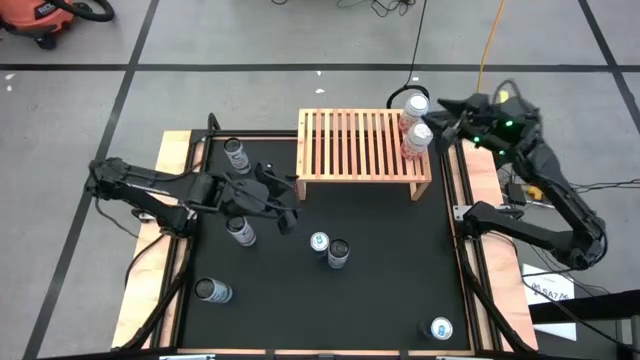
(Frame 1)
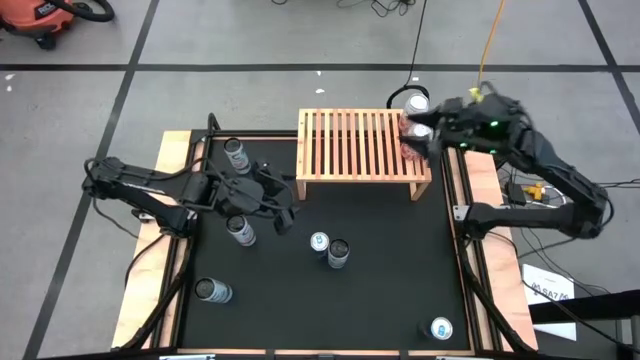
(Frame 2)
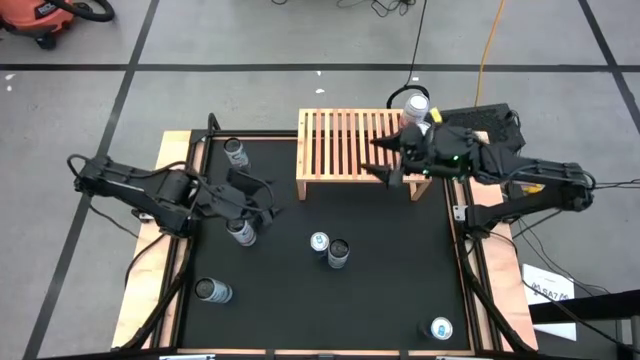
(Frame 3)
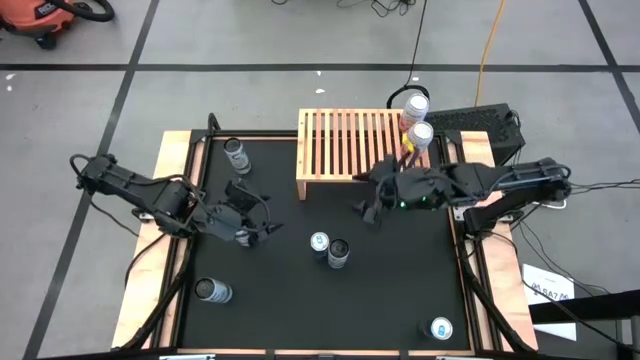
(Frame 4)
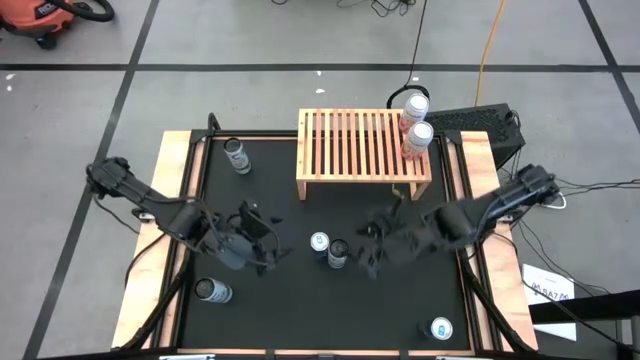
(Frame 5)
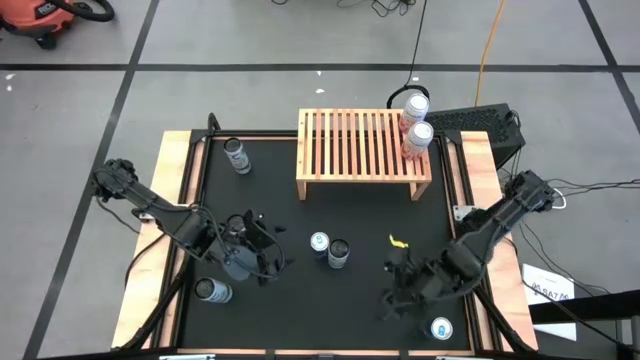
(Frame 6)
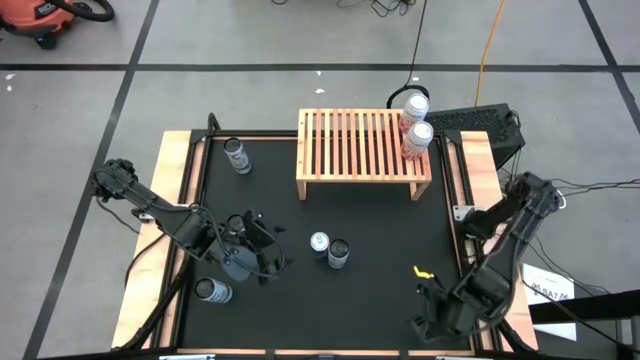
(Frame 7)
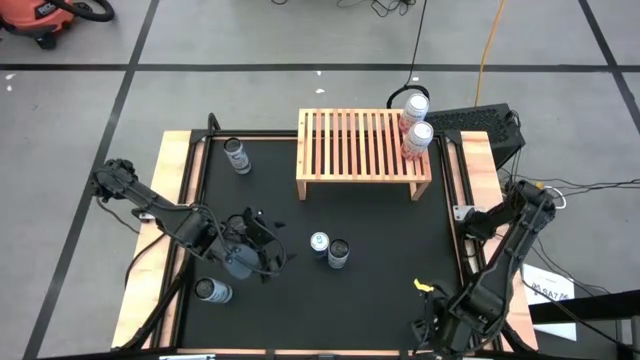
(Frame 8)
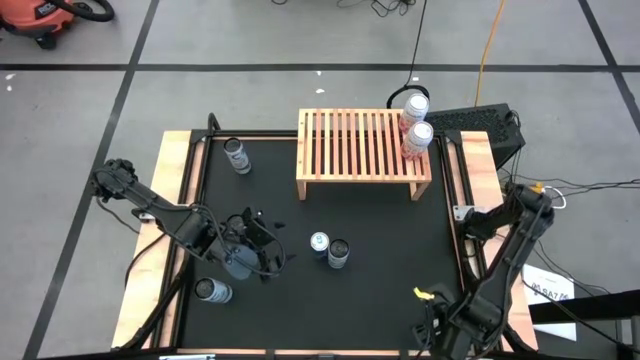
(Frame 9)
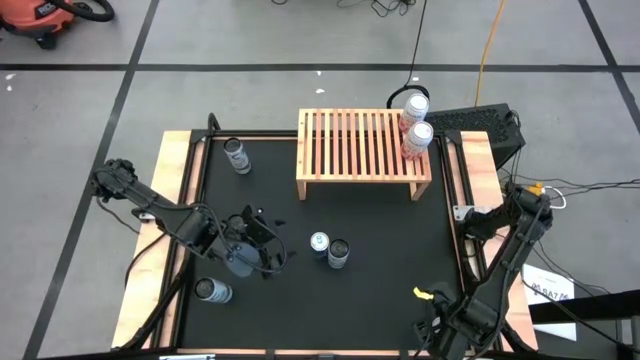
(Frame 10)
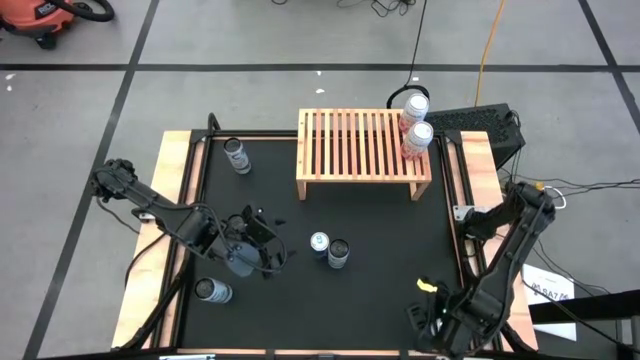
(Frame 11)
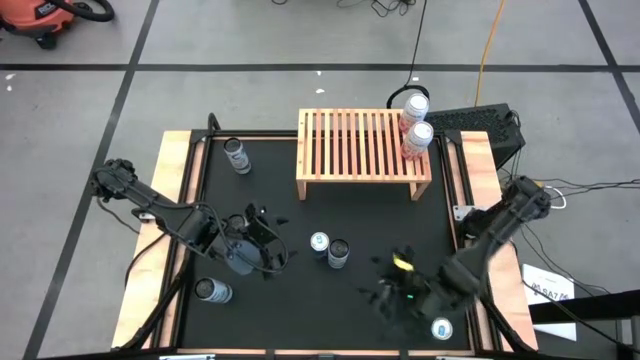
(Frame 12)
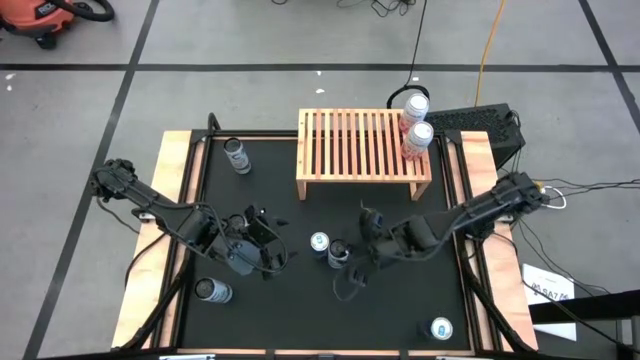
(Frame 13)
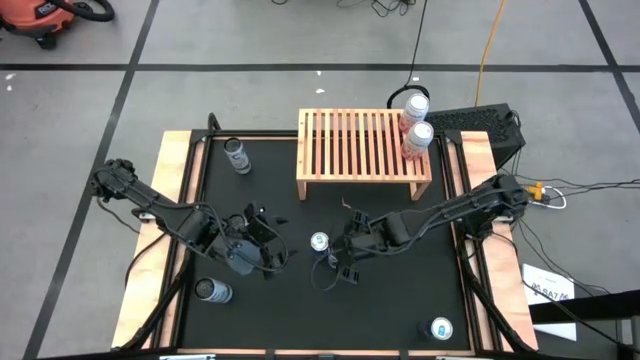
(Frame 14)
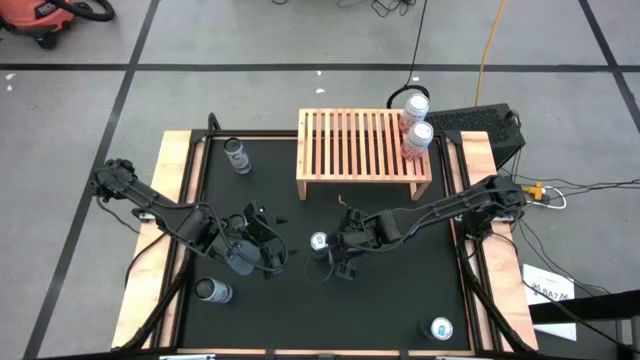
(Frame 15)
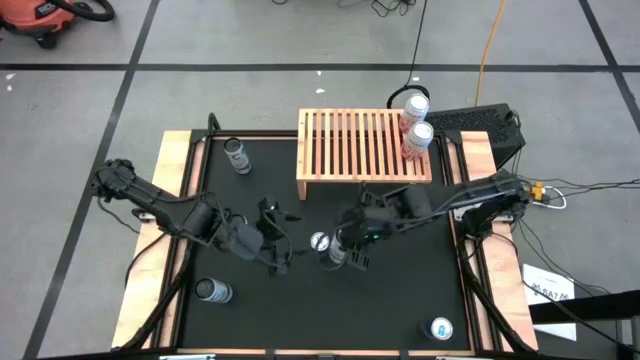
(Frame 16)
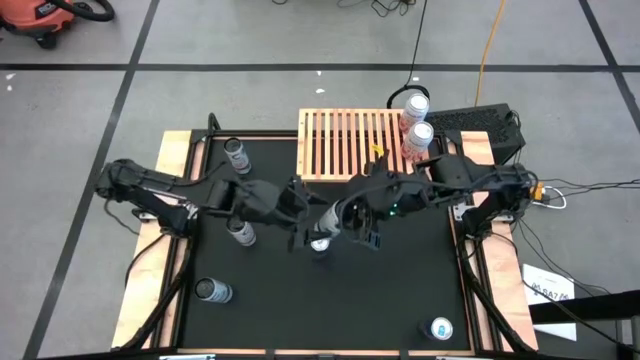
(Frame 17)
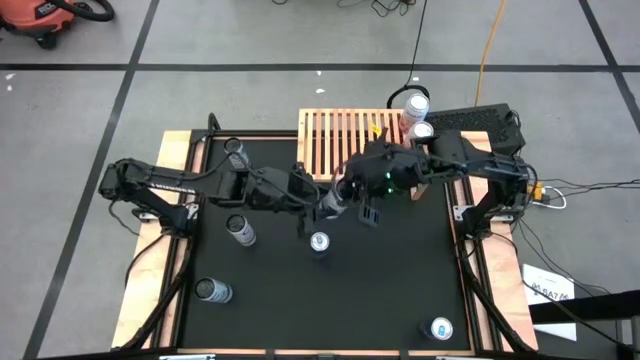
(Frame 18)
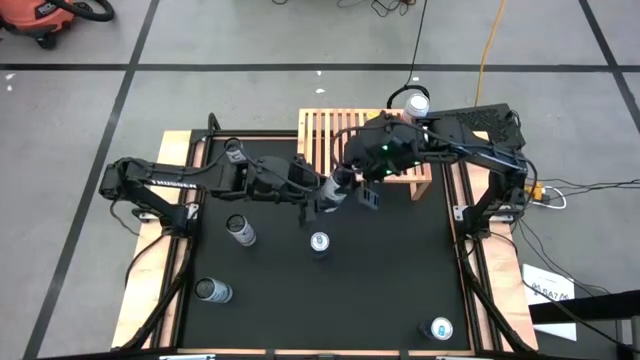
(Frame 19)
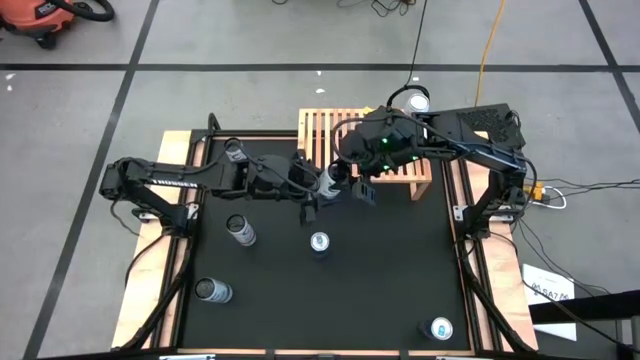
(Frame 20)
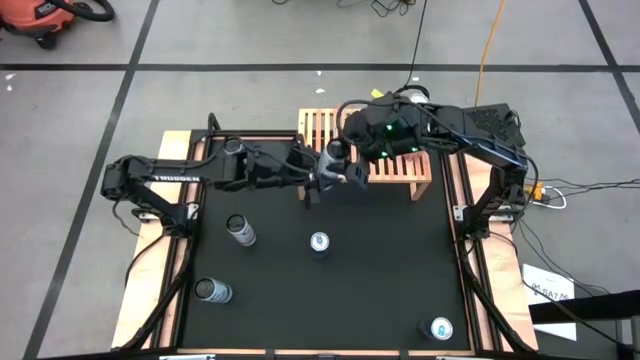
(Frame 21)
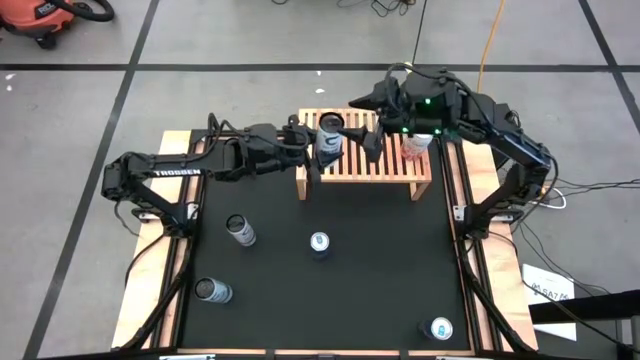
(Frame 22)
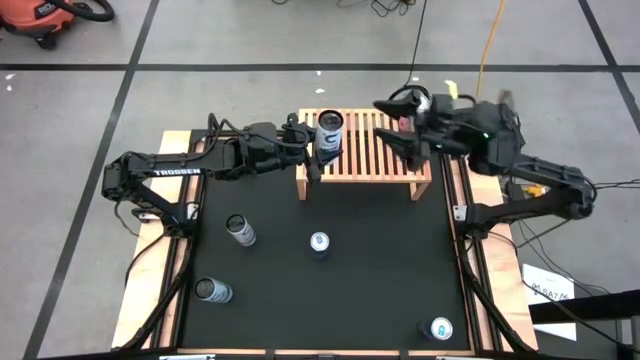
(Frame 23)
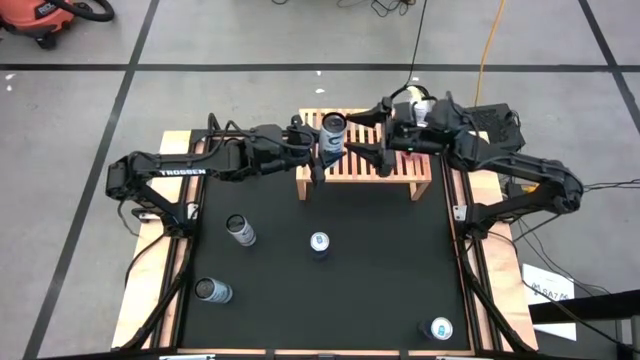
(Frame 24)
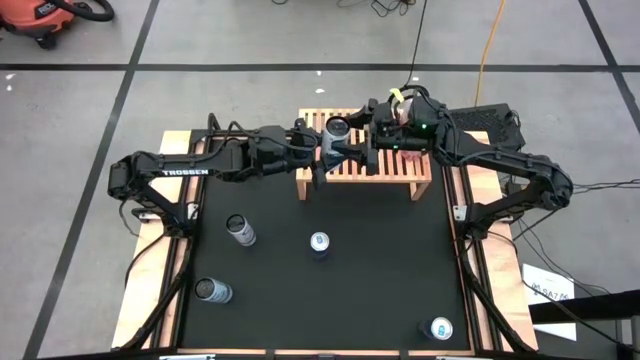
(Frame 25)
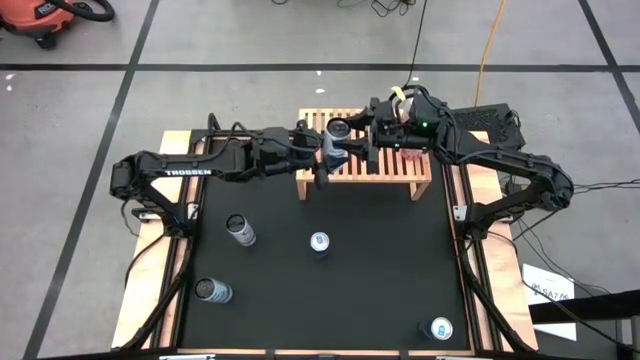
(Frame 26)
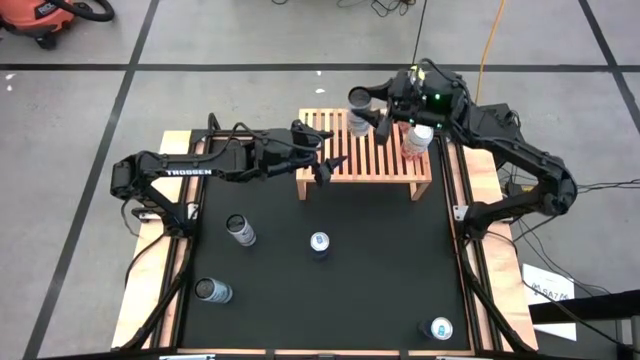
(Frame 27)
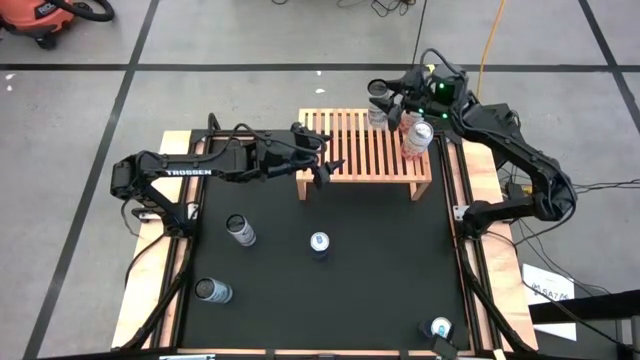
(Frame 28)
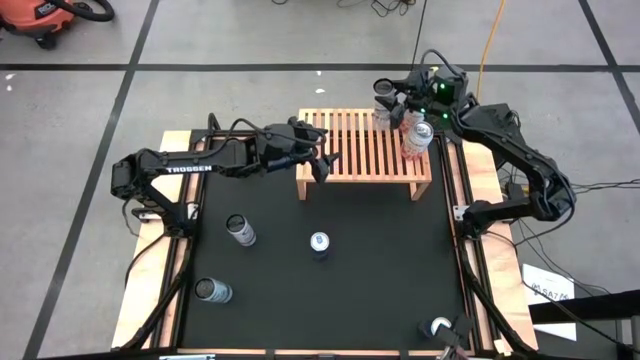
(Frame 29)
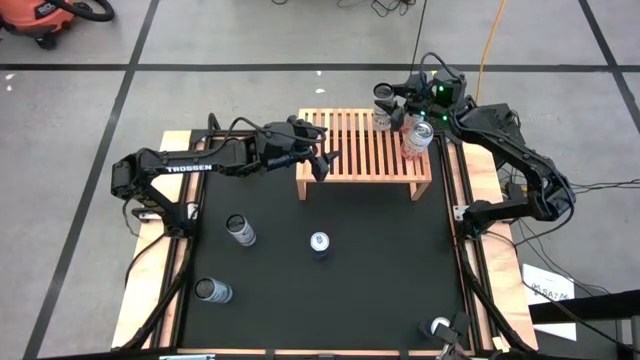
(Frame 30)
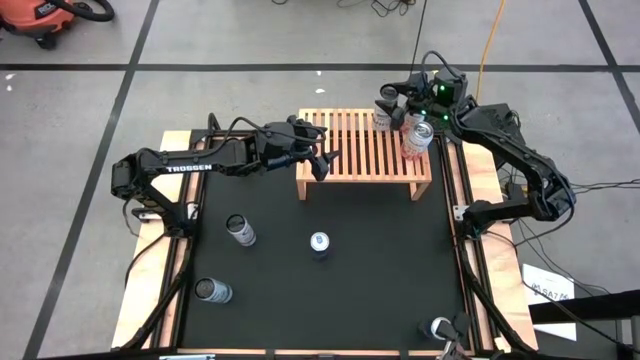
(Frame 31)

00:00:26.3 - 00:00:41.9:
Task: Place canned beverage on shelf
Put the center white soda can on the shelf

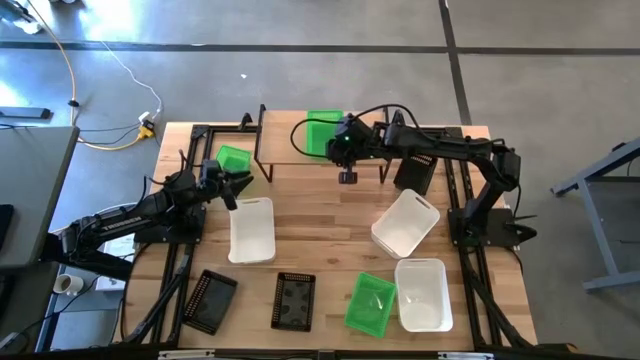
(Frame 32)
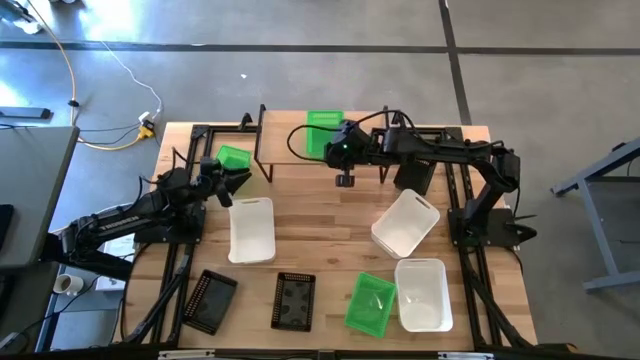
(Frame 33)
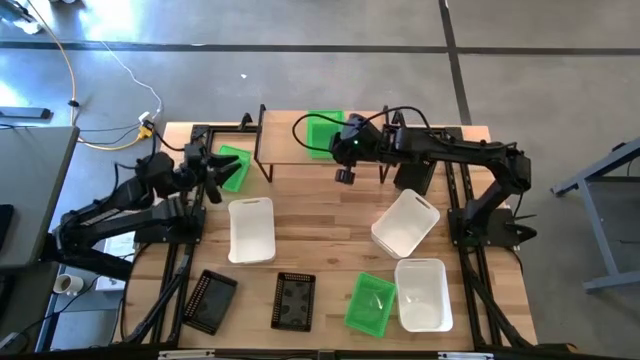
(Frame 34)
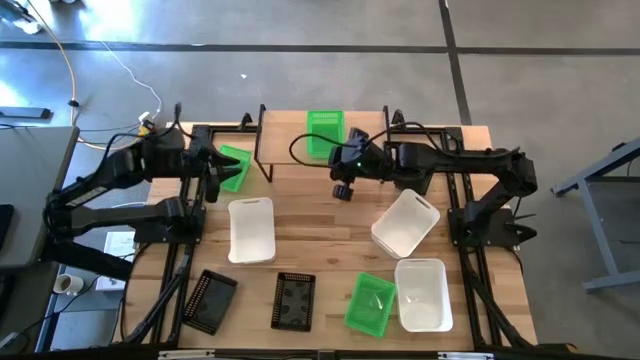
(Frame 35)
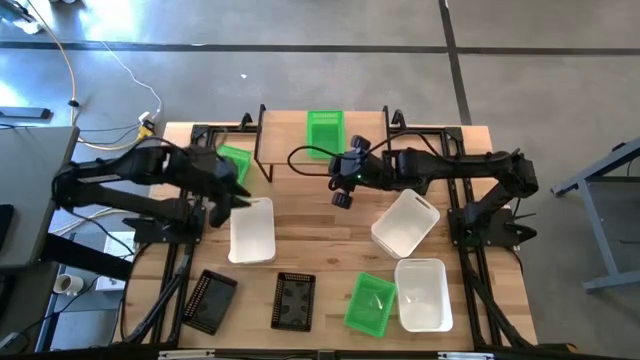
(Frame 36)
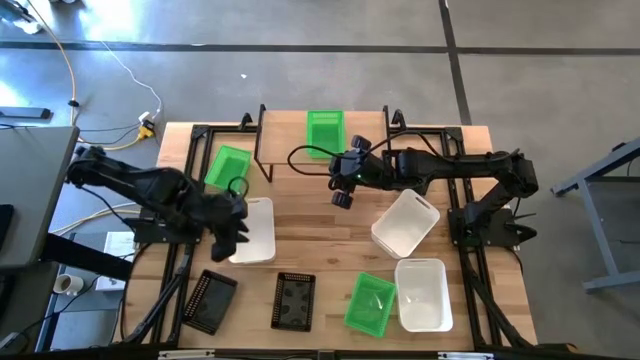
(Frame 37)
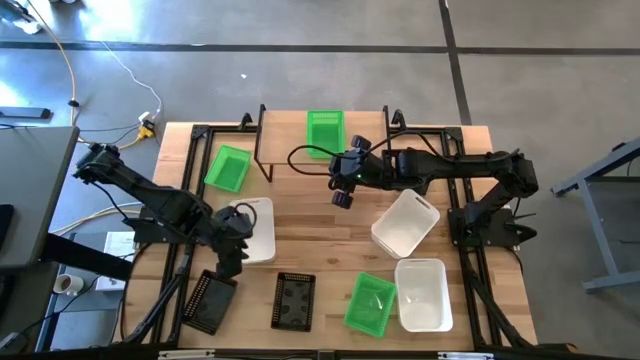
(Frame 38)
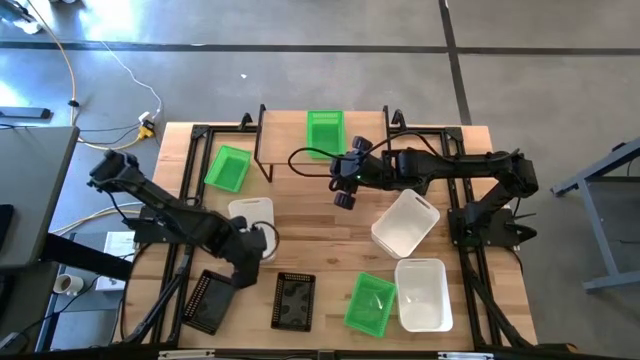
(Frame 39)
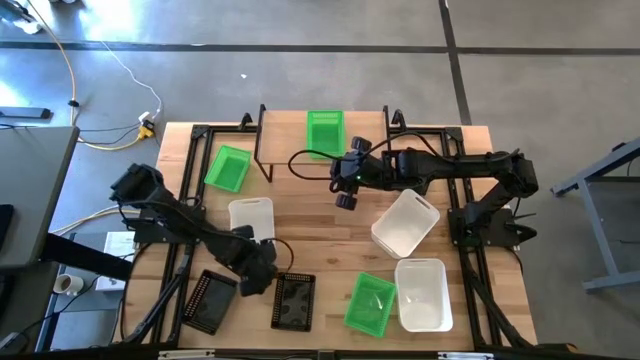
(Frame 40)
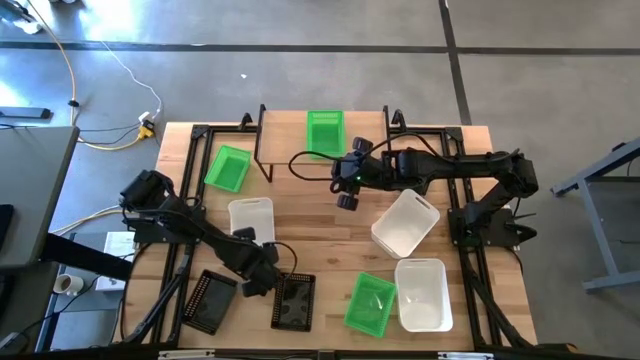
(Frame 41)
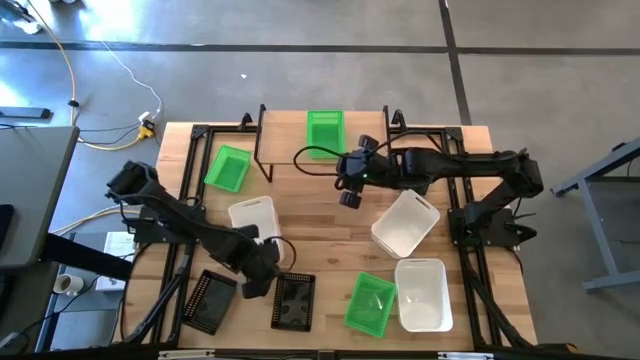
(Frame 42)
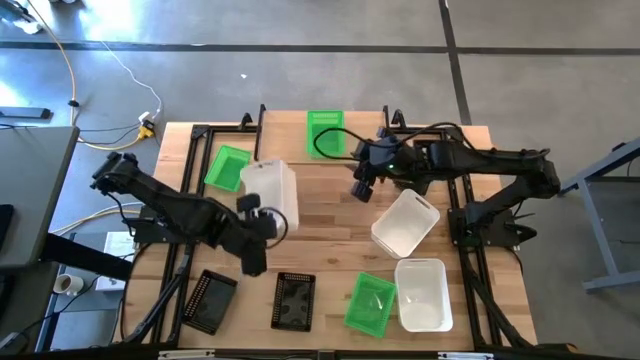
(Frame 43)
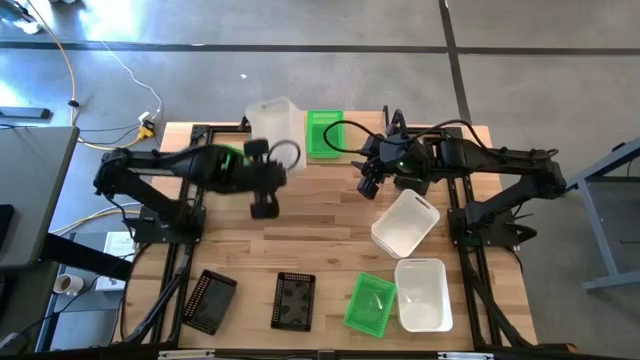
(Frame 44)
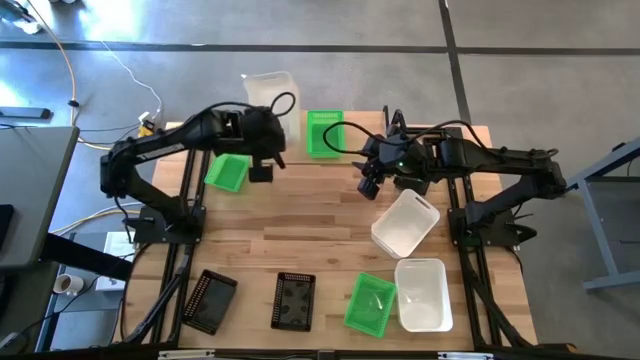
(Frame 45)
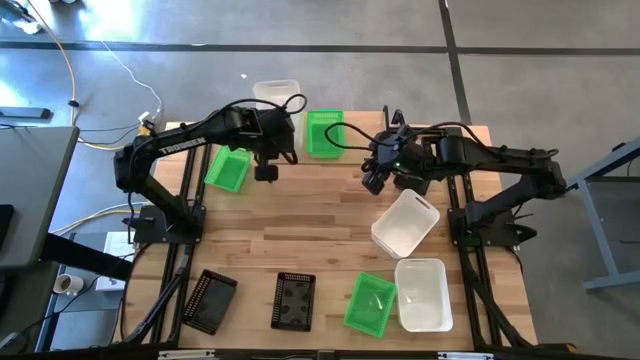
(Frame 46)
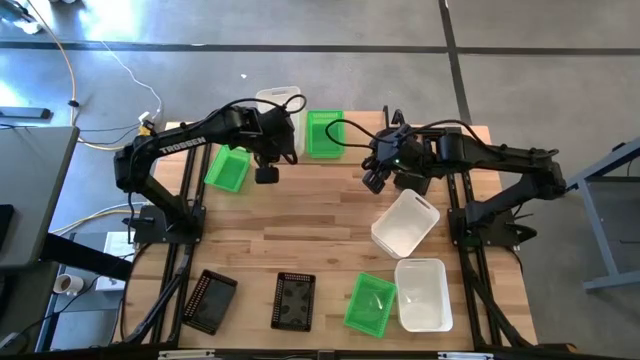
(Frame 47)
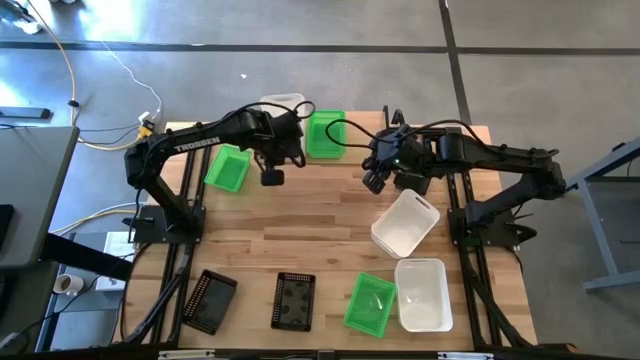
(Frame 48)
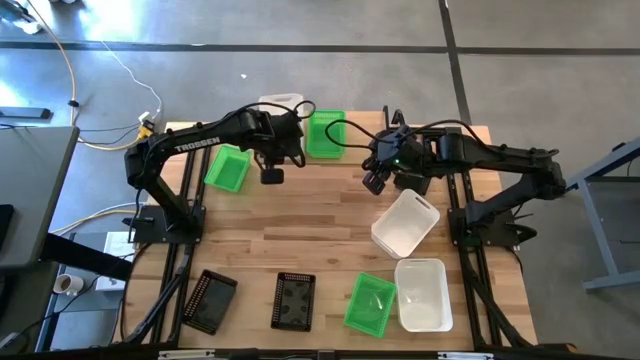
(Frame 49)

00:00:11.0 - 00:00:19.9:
Task: Stack baskets on shelf by color
Put the top left white bin on the shelf
